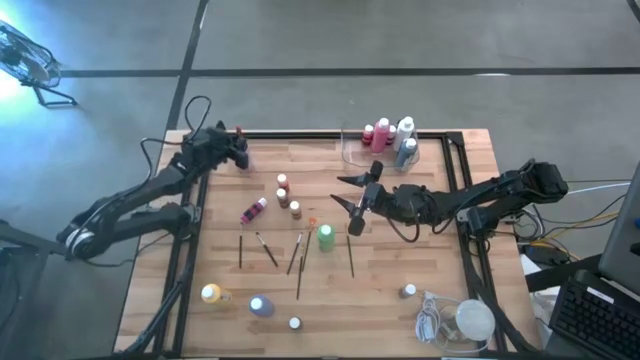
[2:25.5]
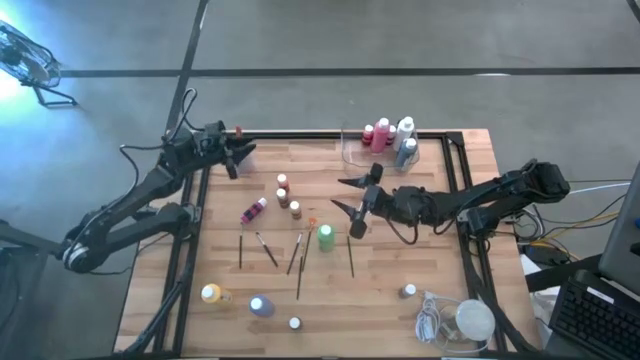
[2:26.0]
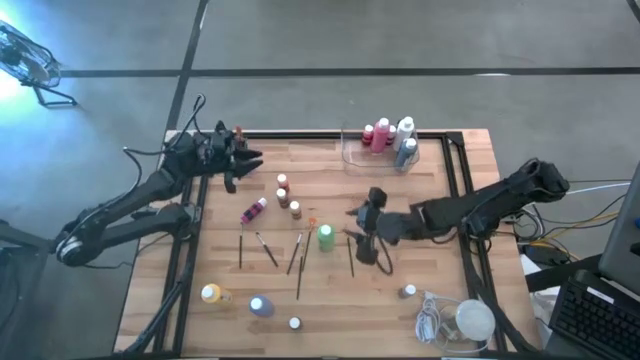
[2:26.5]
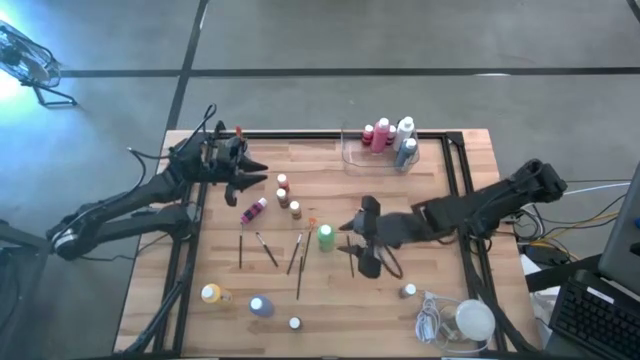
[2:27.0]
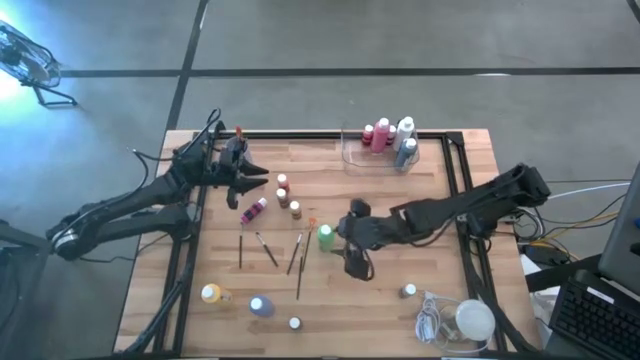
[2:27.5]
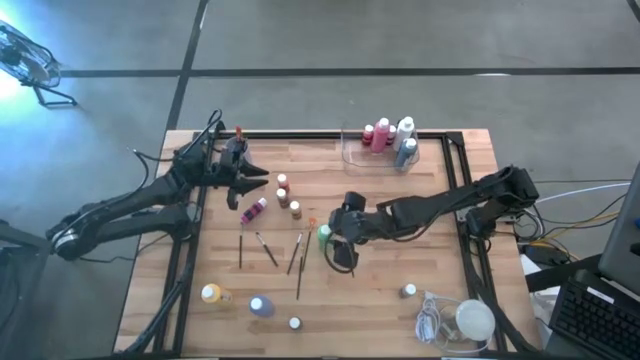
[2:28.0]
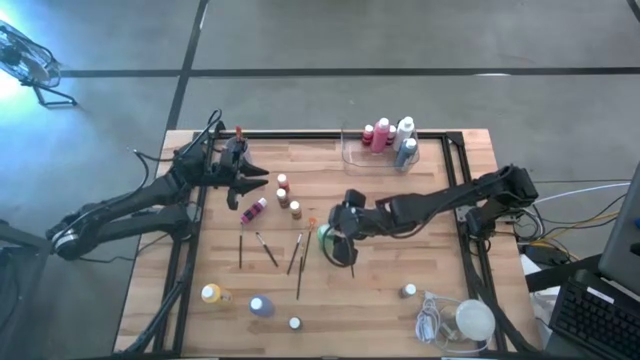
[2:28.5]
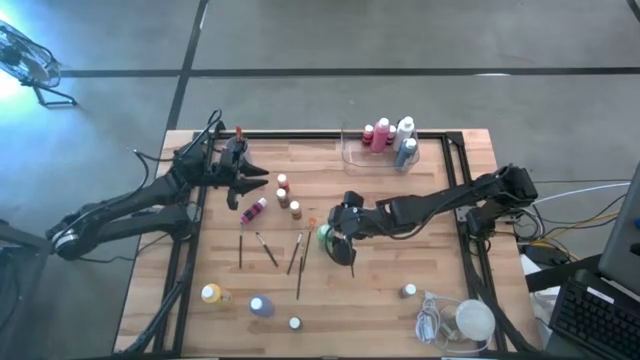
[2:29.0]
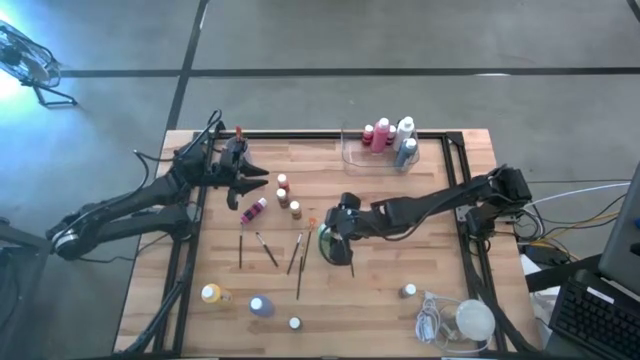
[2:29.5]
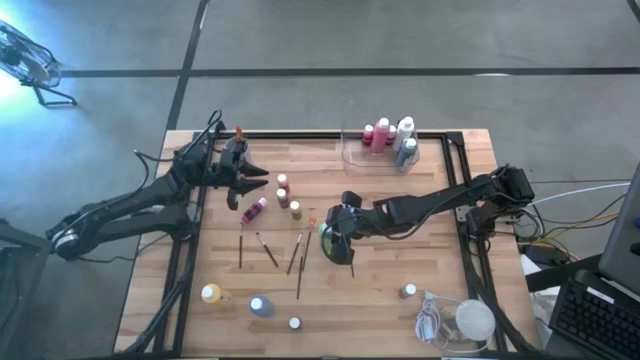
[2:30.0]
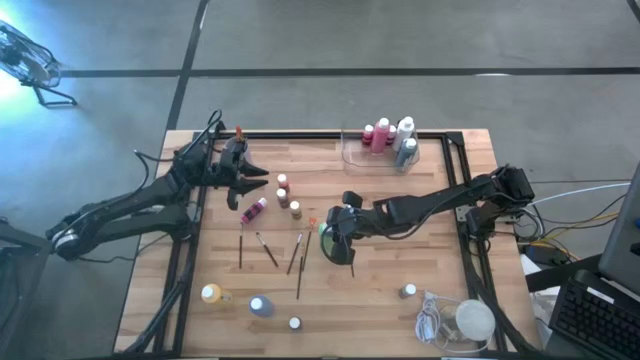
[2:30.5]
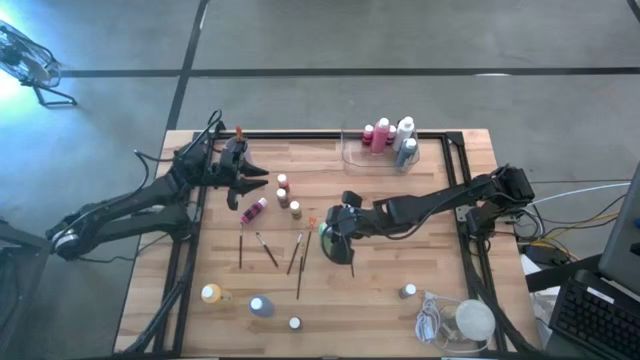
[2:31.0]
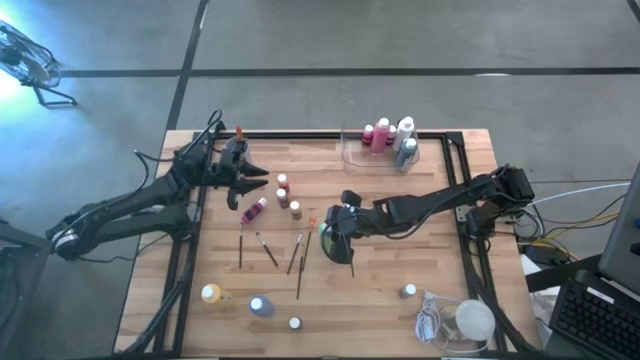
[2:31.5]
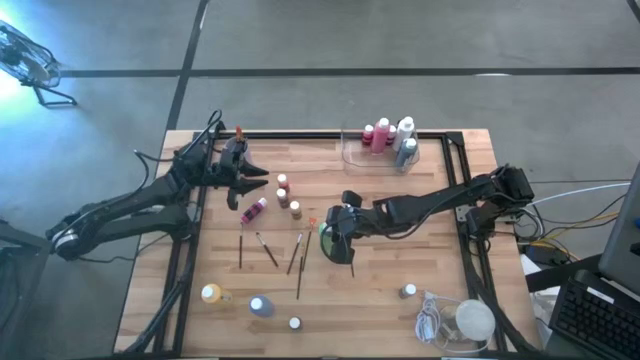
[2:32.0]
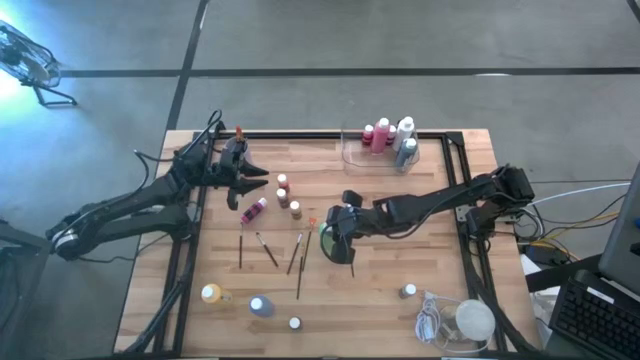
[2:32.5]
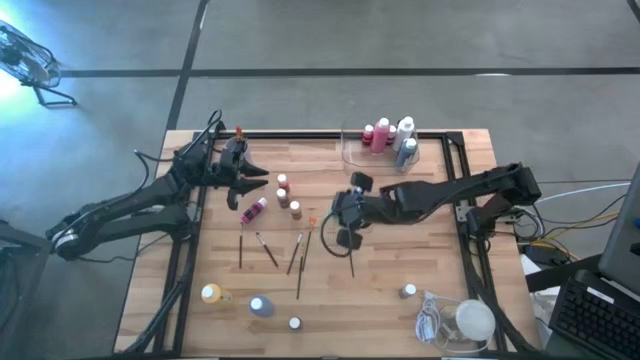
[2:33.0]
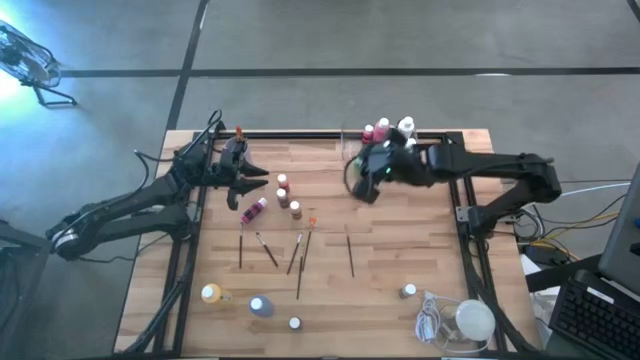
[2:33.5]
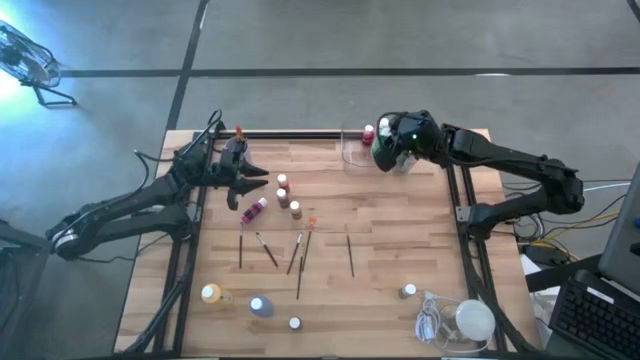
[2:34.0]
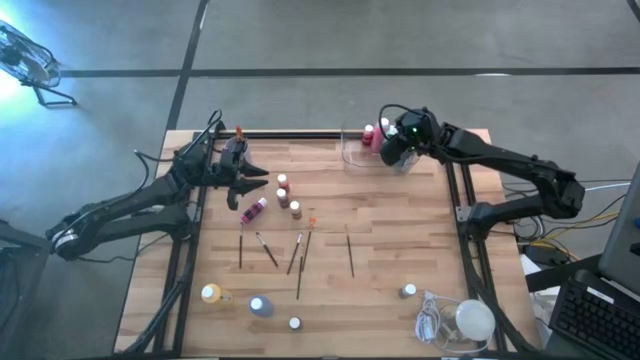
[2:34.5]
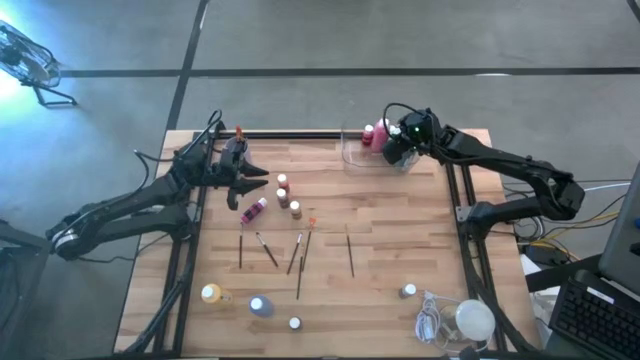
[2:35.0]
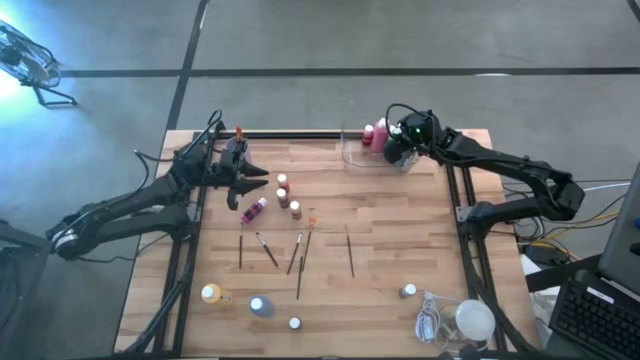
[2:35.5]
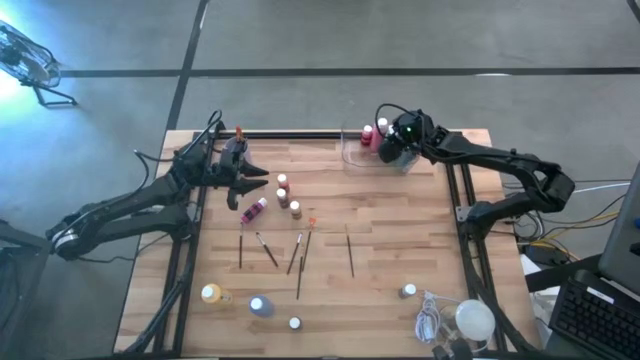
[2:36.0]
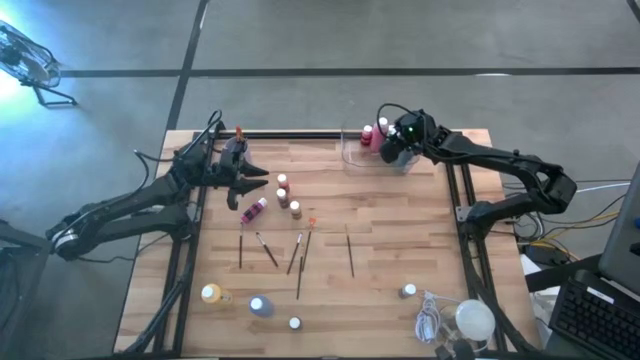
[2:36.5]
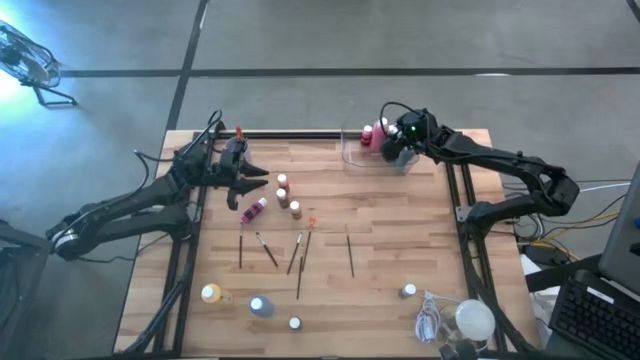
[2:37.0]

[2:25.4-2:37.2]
Task: Pick & Place Paint Supplies
Put the green paint bottle into the transparent bin

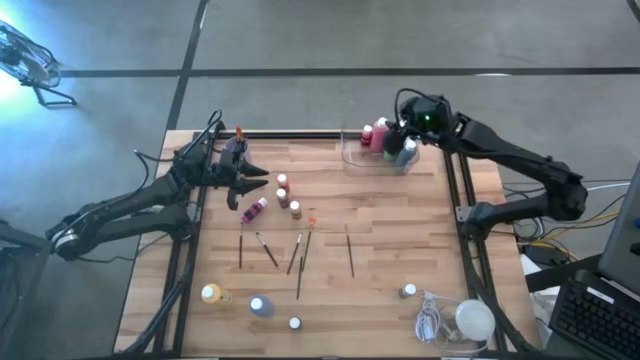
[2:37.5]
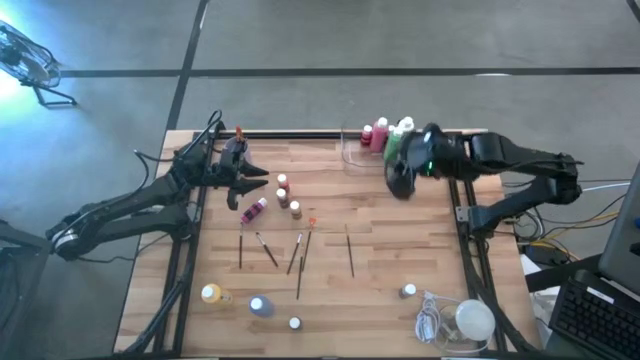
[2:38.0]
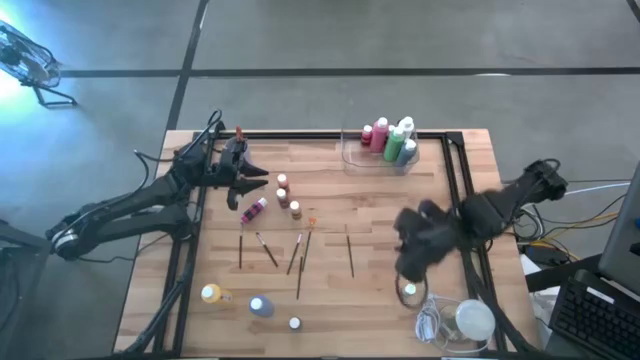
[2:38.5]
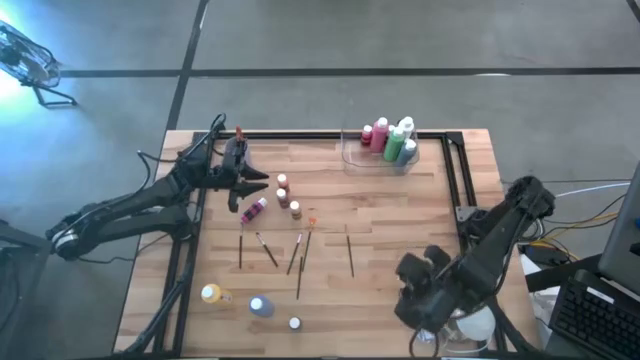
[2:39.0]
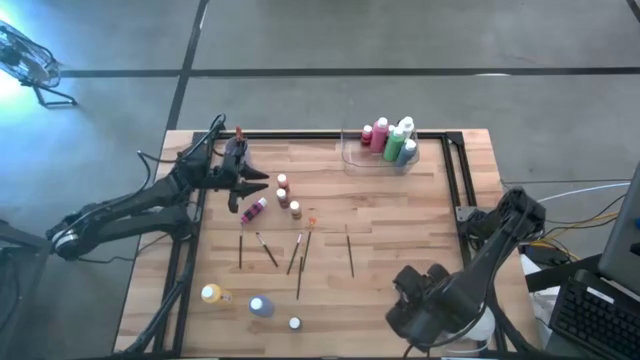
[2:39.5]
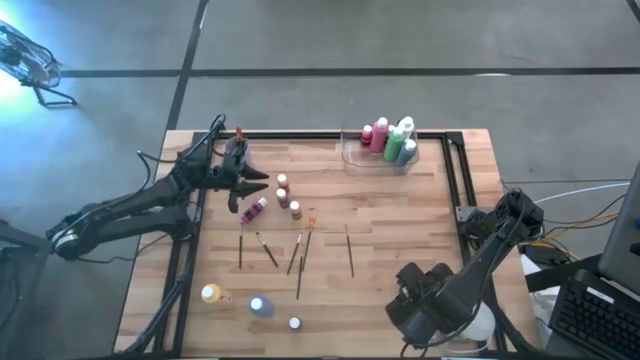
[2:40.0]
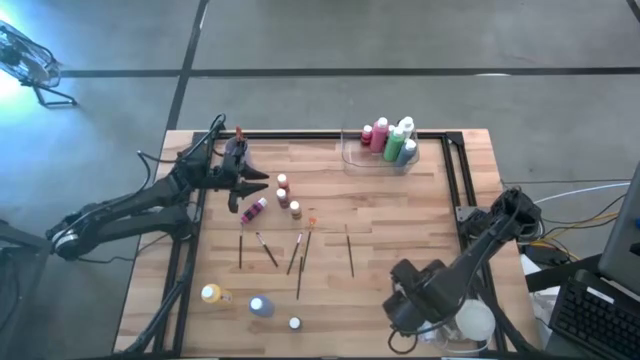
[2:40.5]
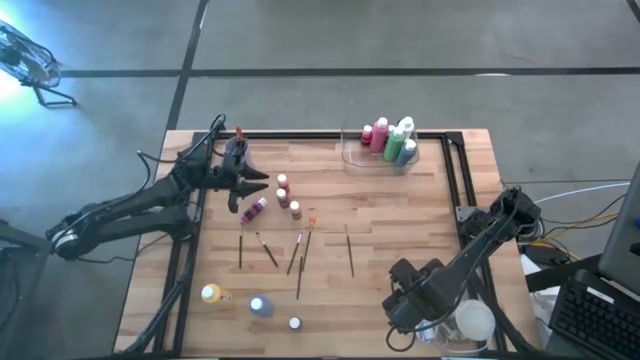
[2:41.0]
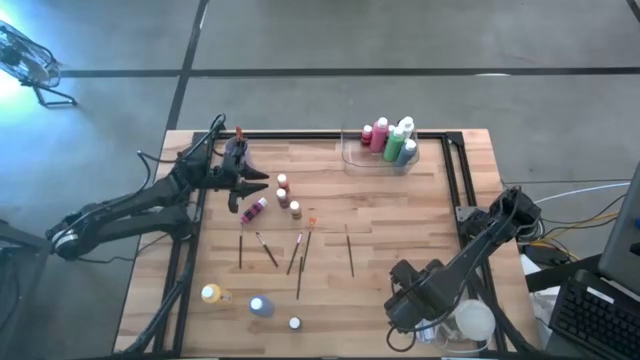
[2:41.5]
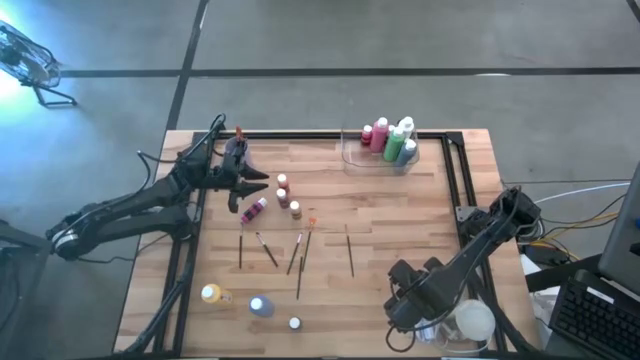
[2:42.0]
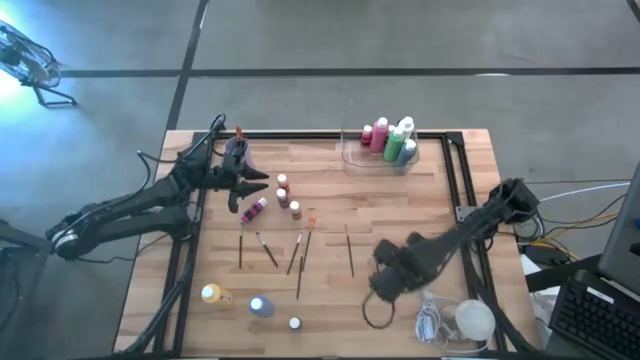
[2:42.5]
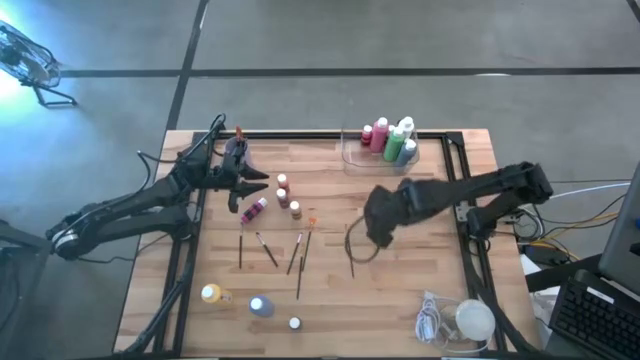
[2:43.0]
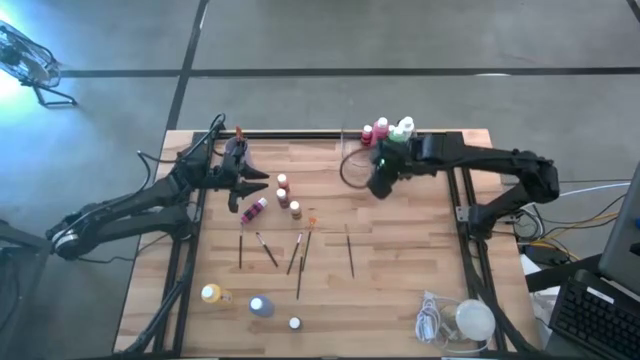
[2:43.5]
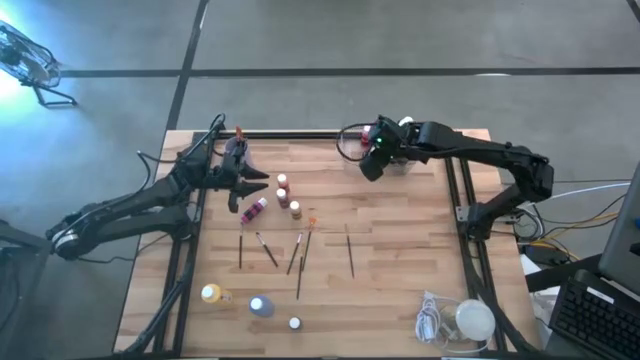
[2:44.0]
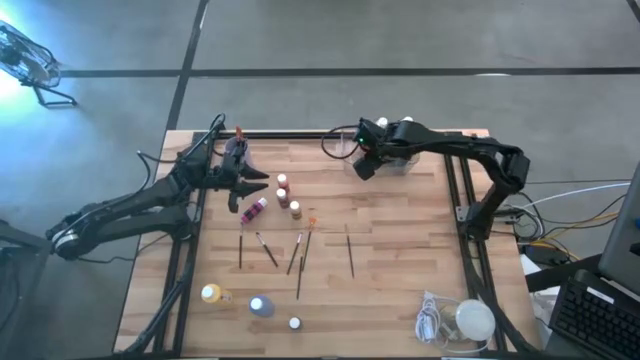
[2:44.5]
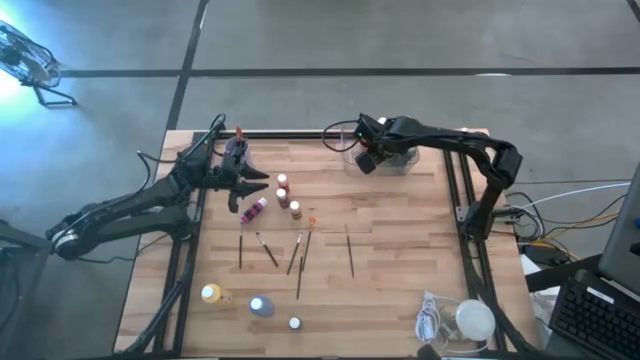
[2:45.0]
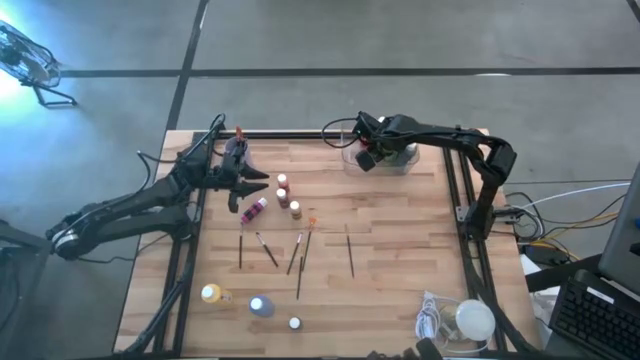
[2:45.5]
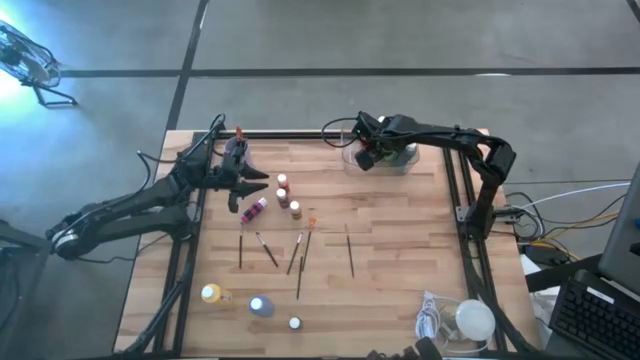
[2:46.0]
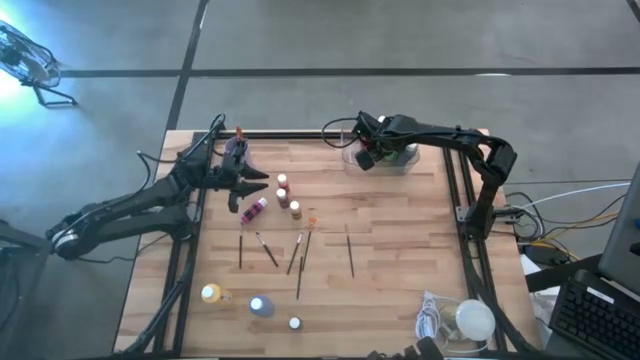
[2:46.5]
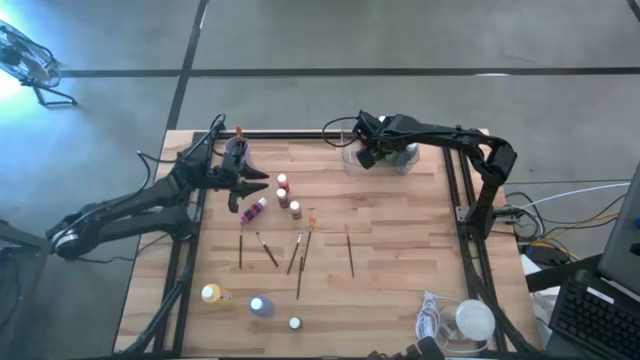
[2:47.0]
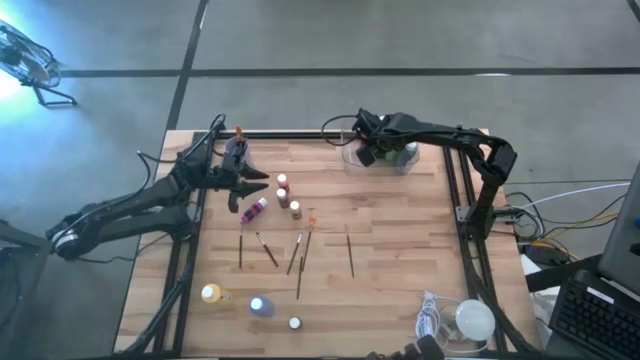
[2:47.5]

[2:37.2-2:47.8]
Put the gray paint bottle into the transparent bin
